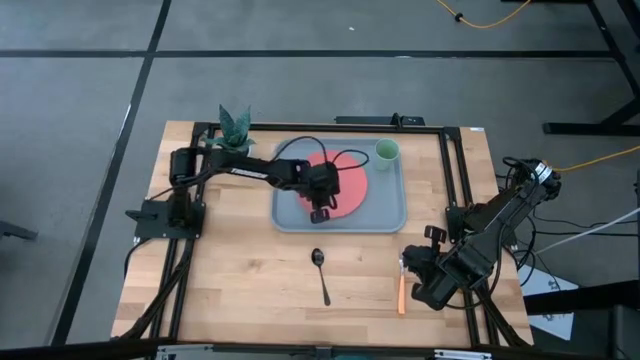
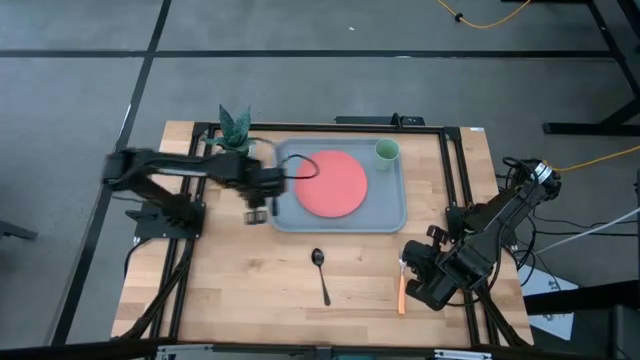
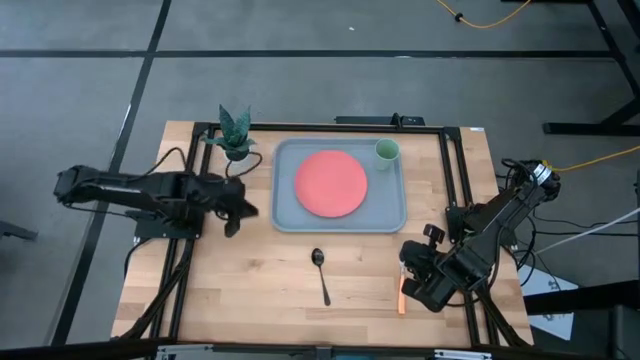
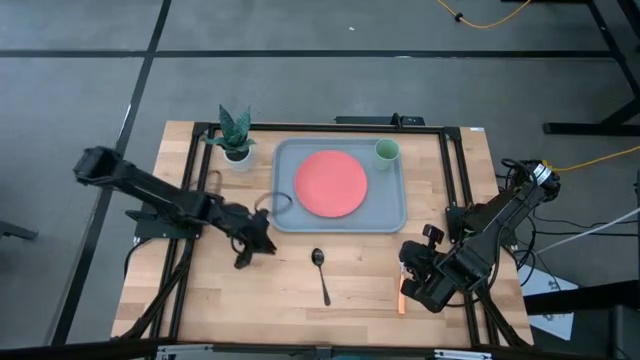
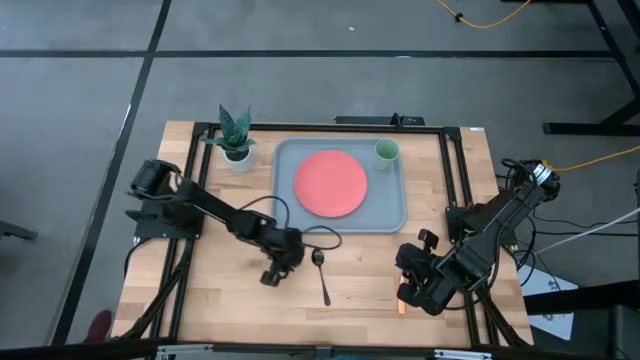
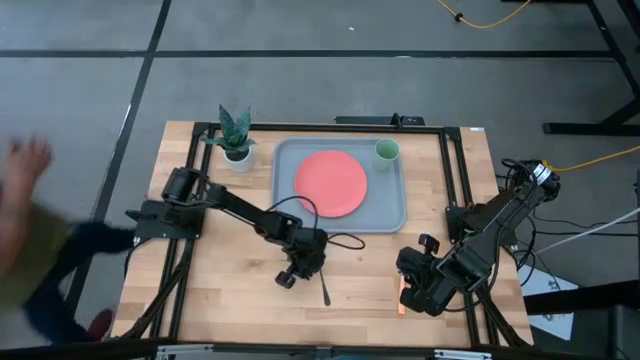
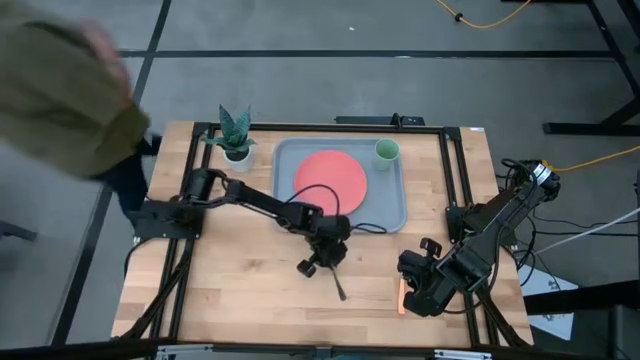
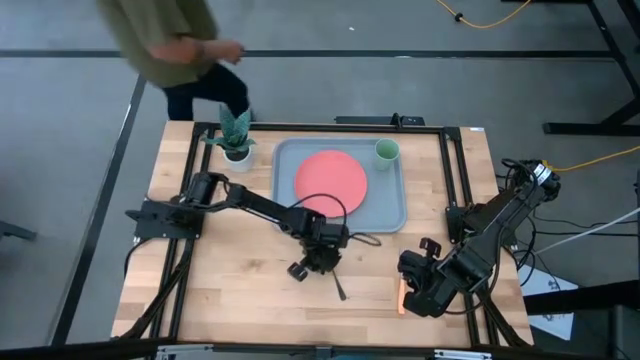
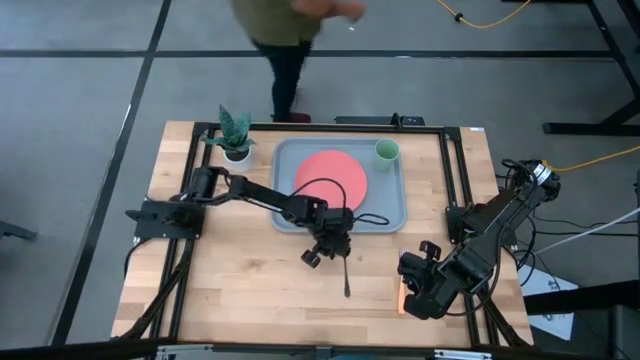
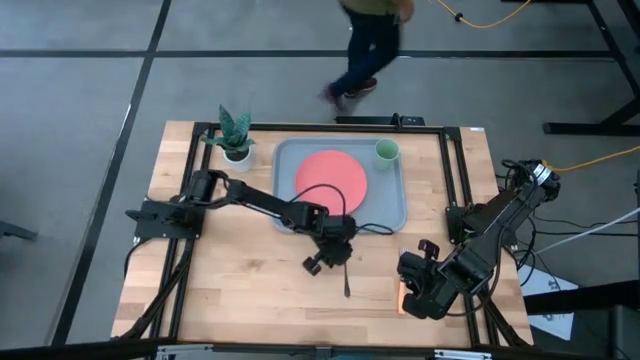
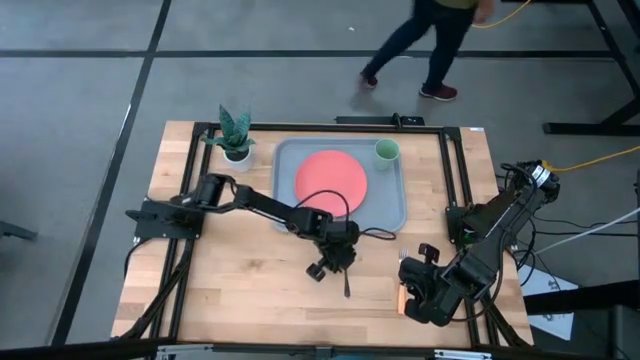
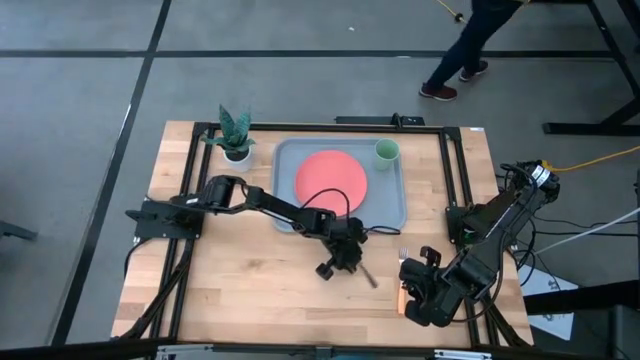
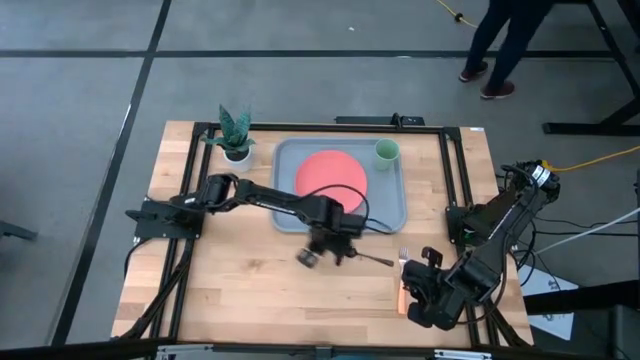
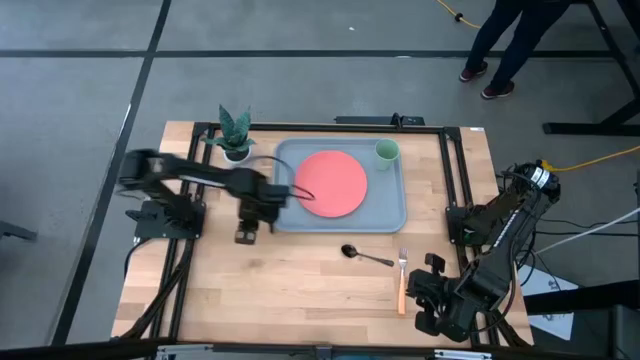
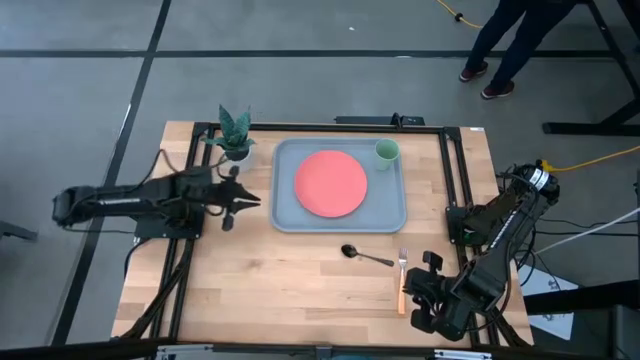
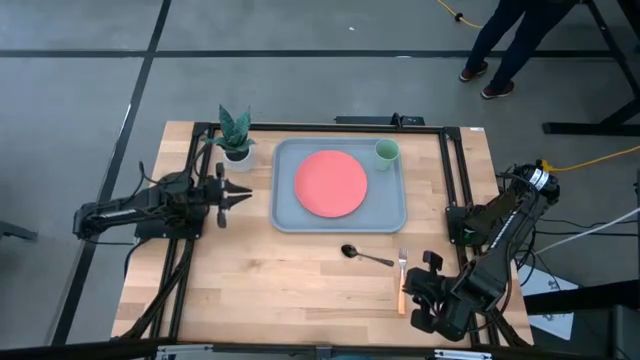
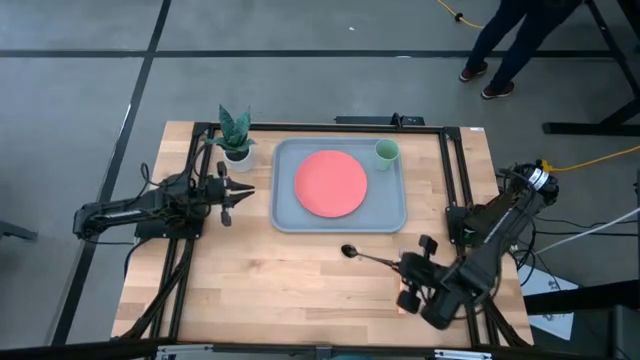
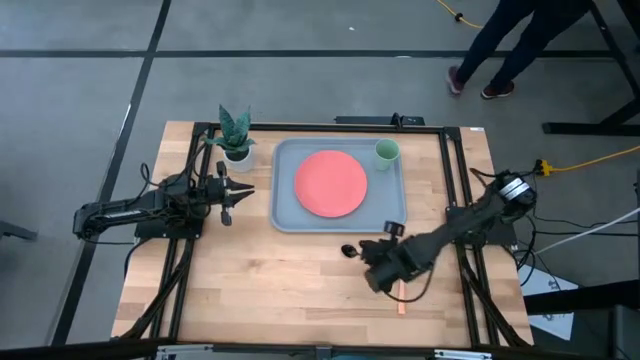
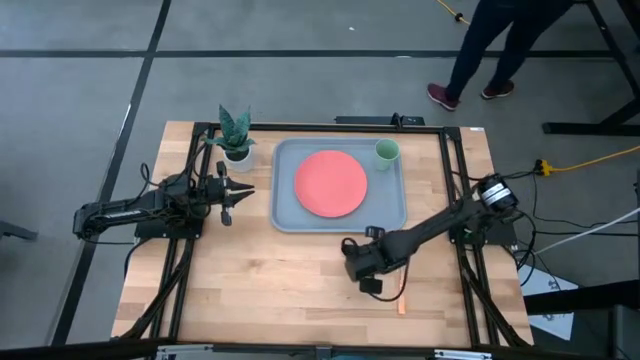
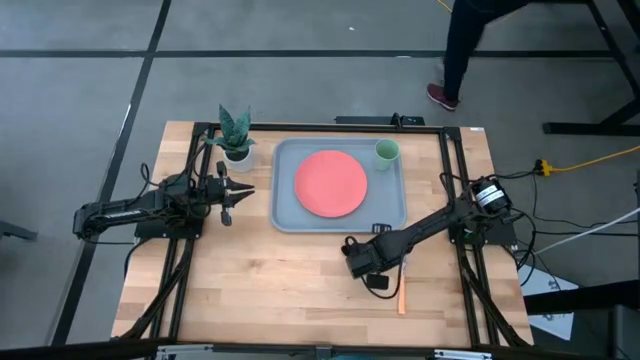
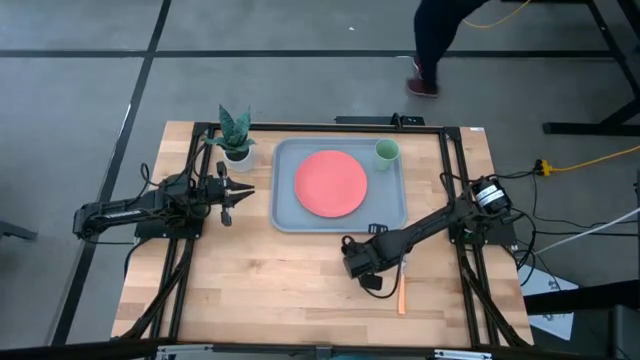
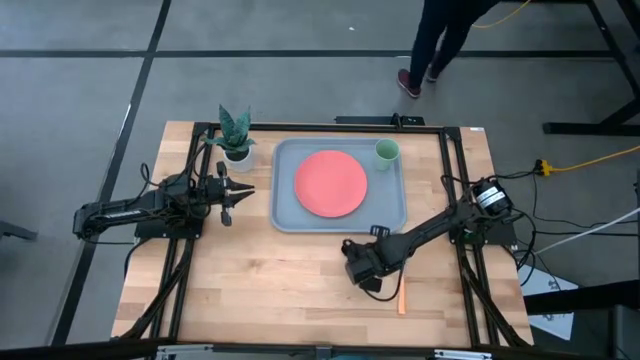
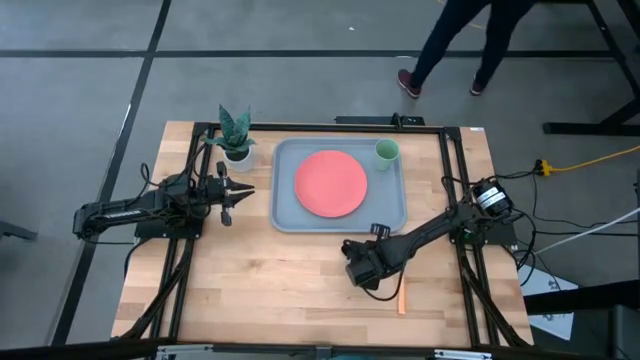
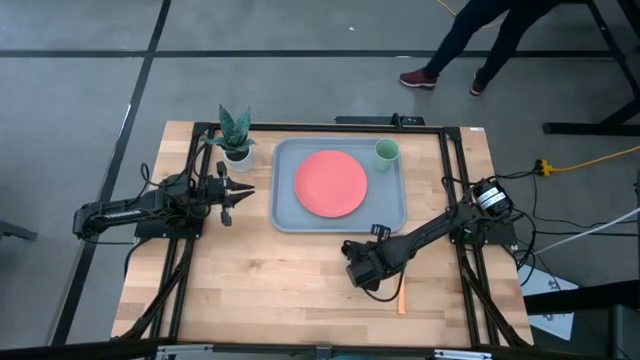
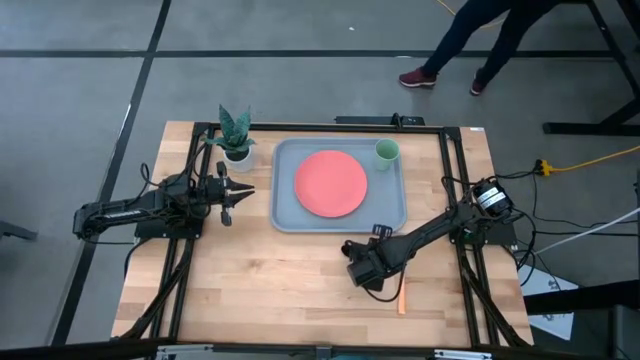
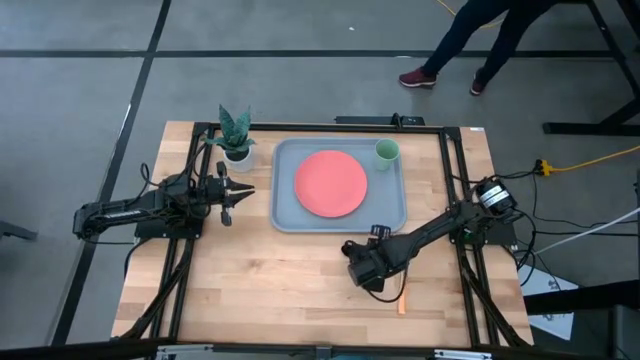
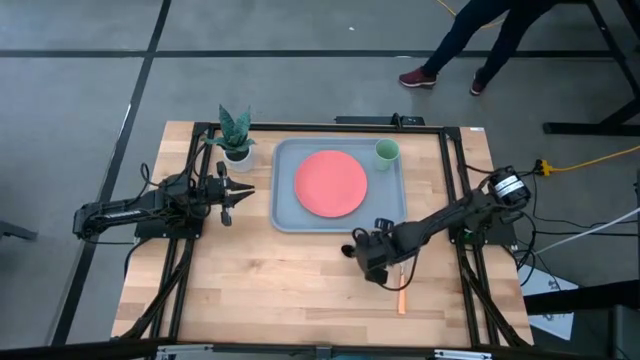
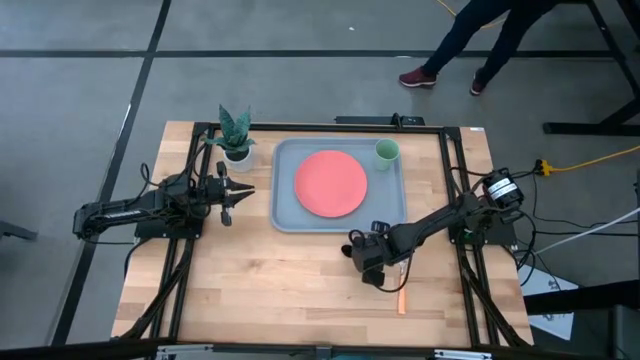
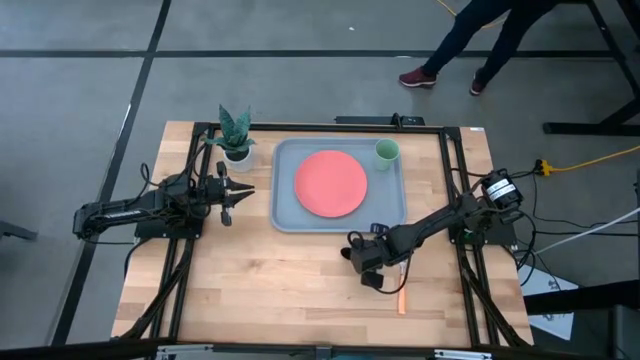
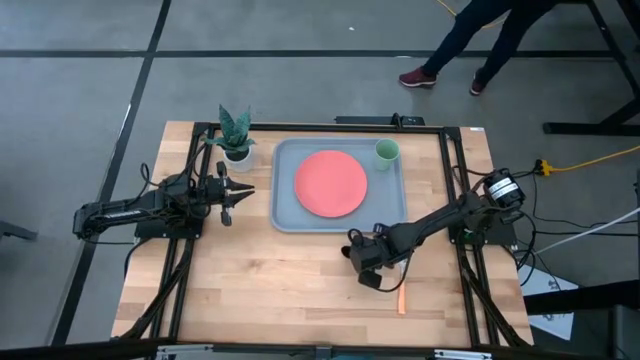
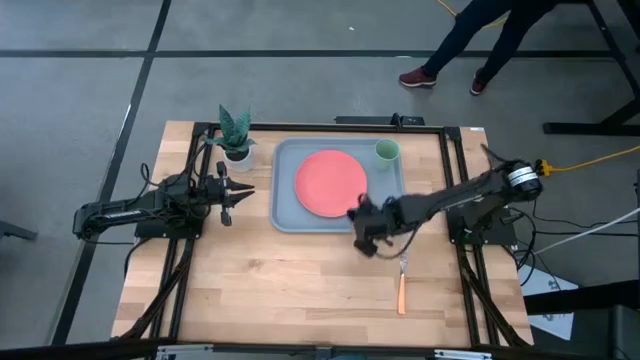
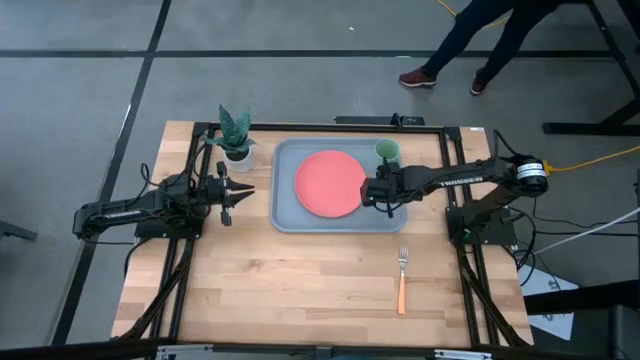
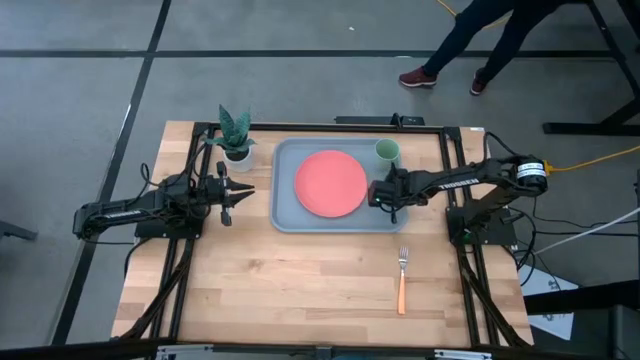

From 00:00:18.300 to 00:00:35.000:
Task: Pick and place plate/cup/fork/spoon on tray
Put the black spoon on the blue tray to the right of the pink plate

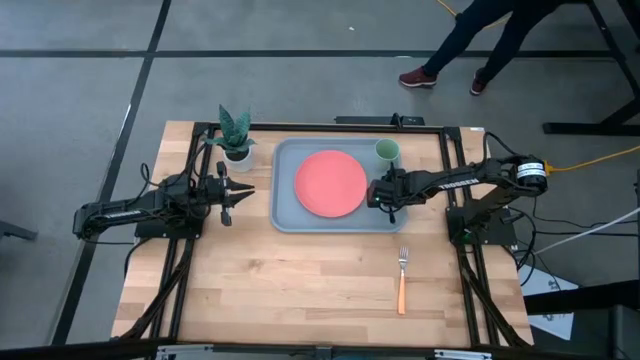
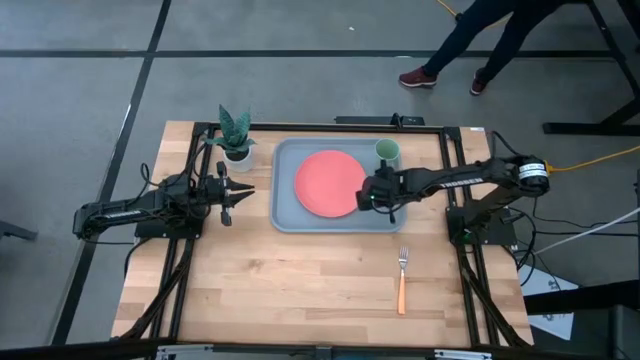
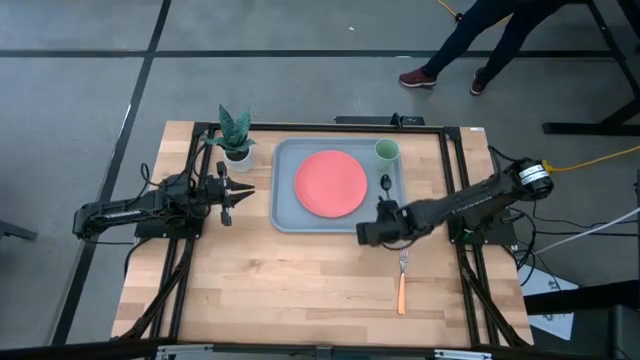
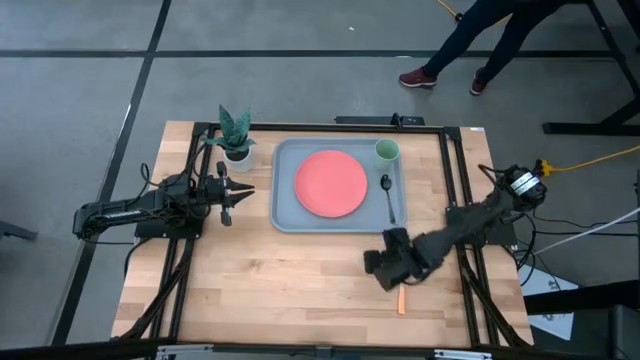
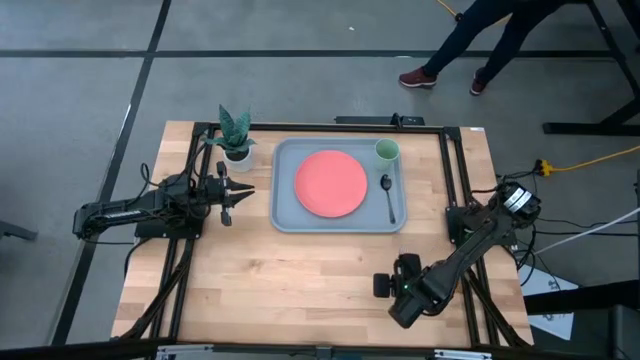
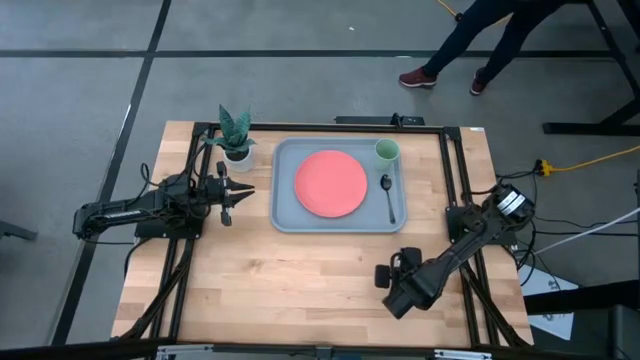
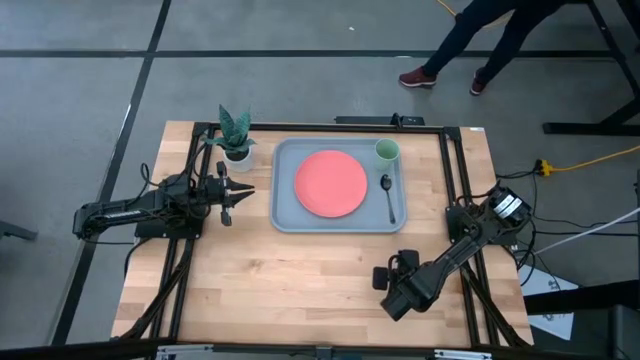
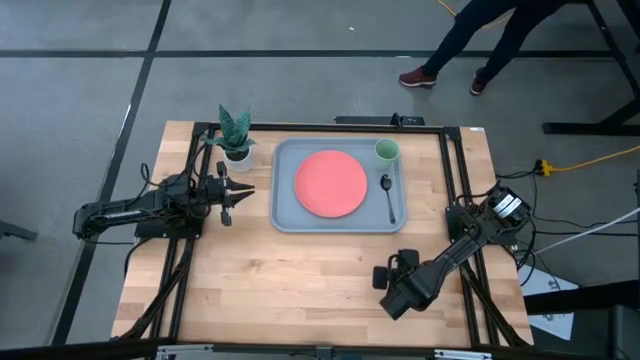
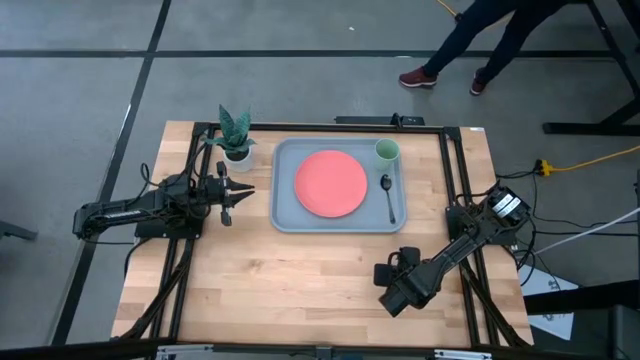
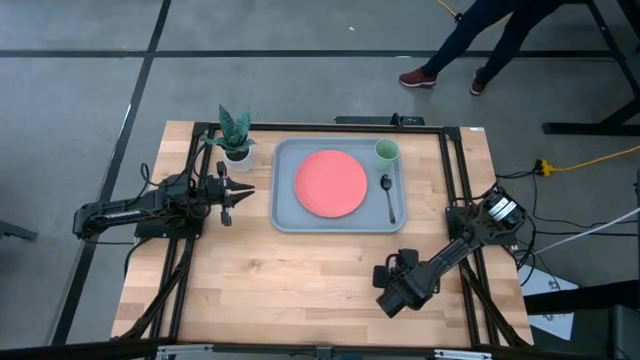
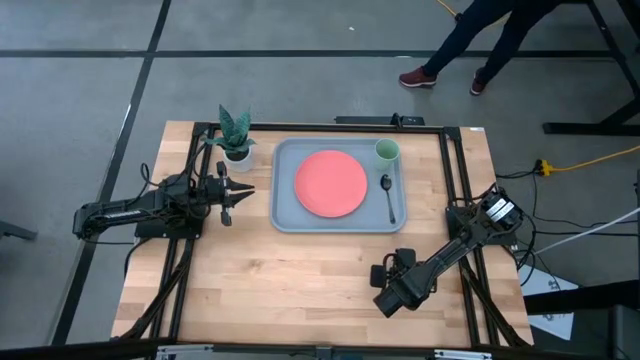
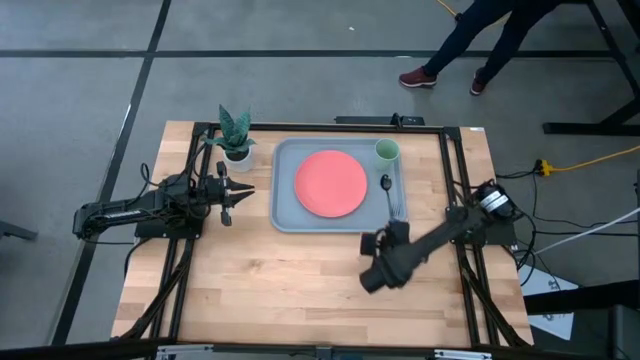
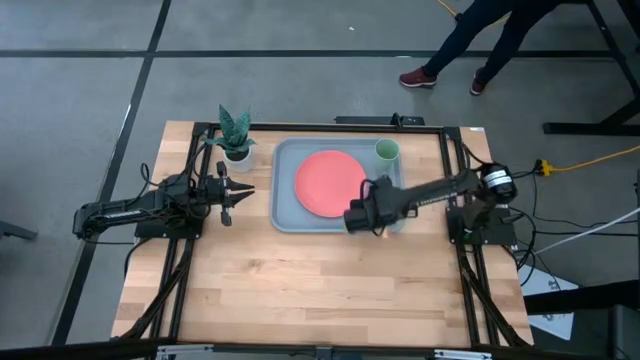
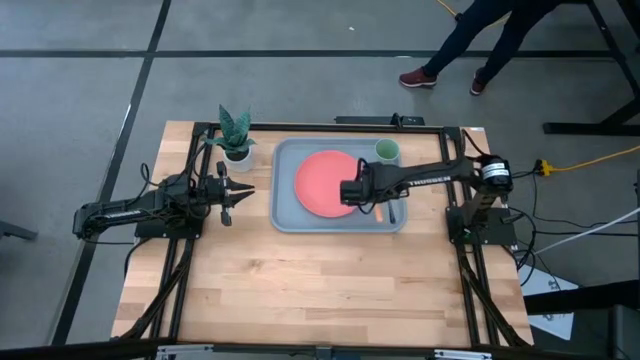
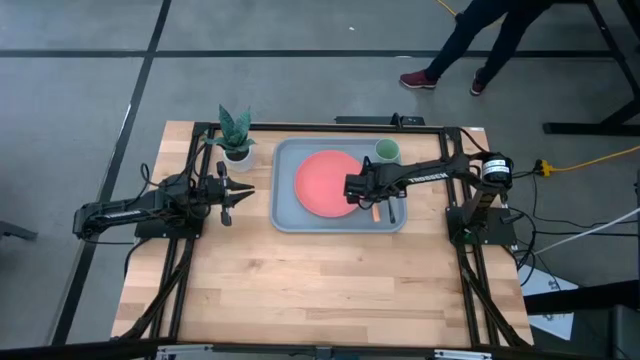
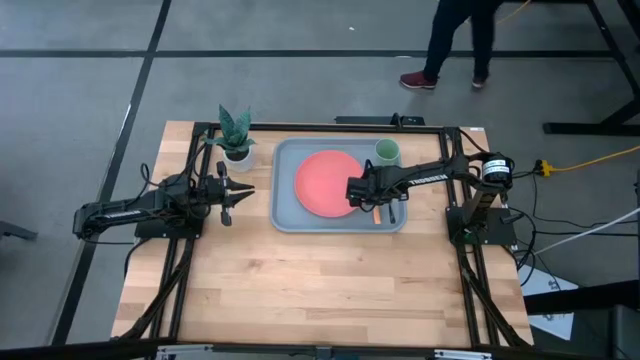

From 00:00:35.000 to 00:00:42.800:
Put the orange spoon on the blue tray to right of the pink plate
